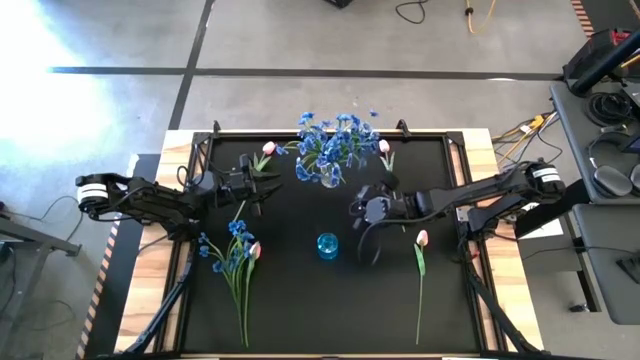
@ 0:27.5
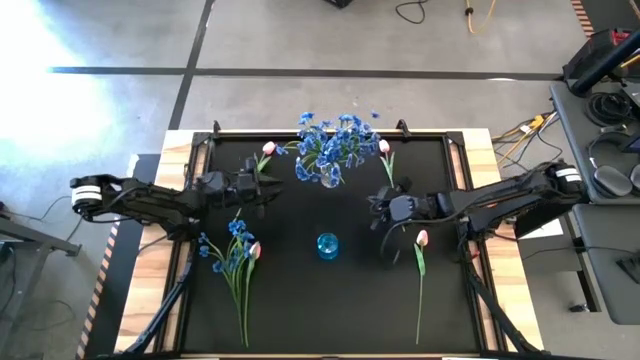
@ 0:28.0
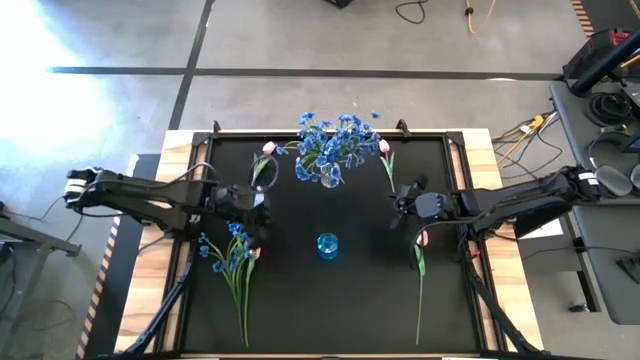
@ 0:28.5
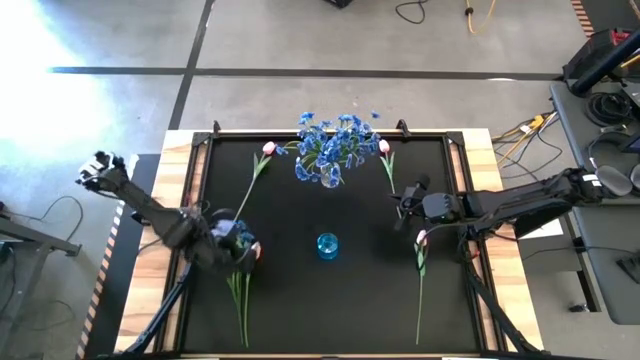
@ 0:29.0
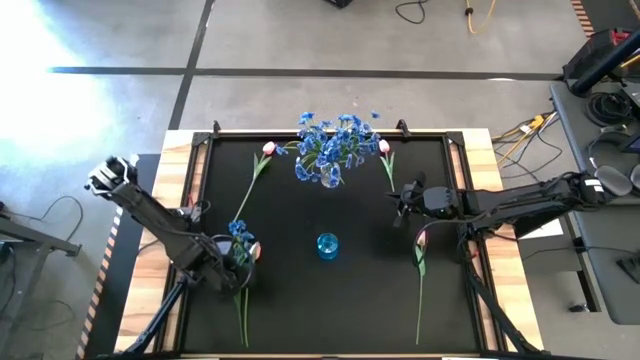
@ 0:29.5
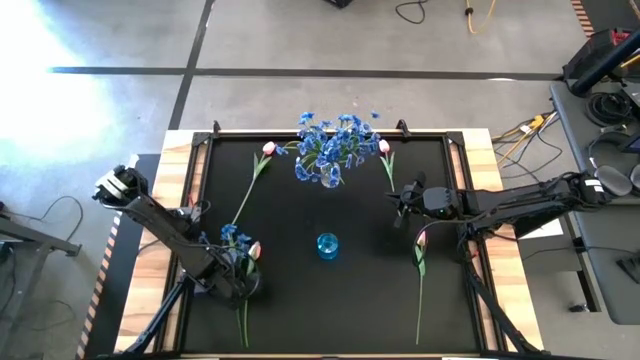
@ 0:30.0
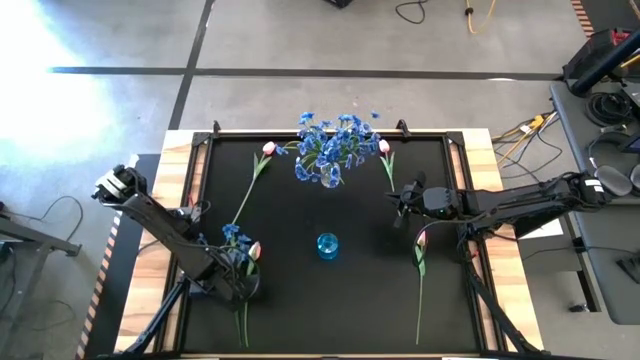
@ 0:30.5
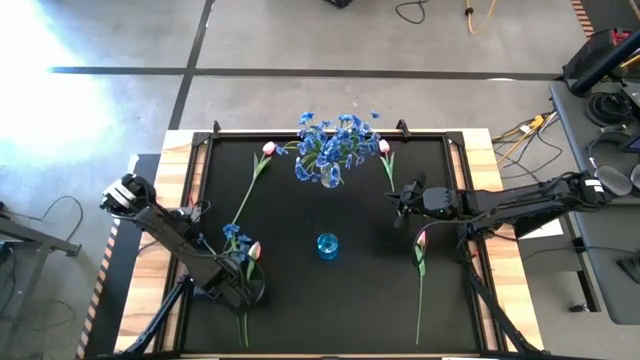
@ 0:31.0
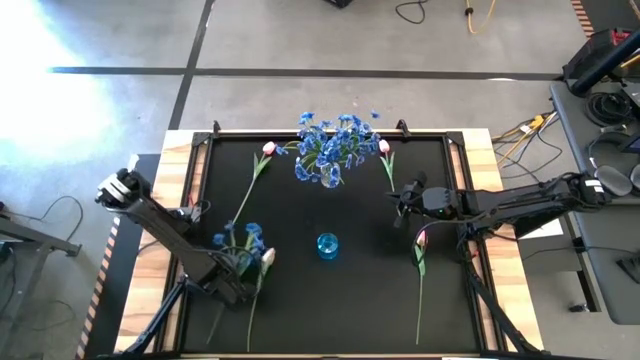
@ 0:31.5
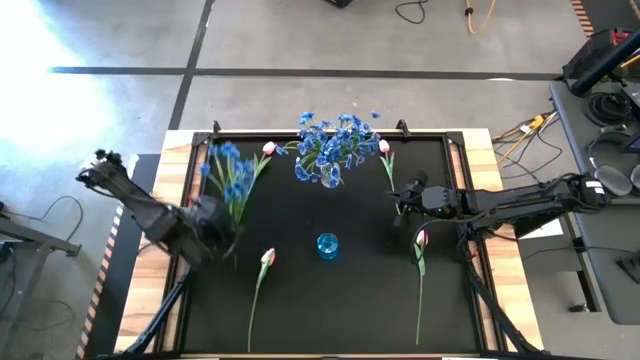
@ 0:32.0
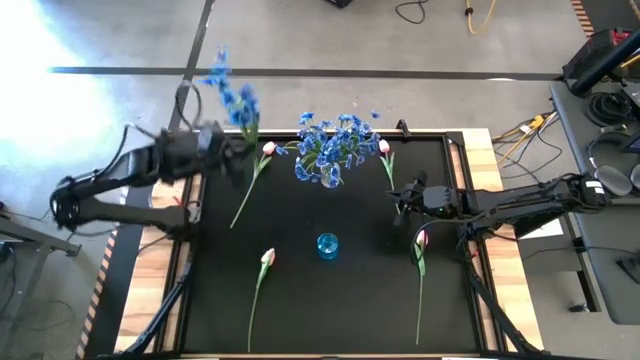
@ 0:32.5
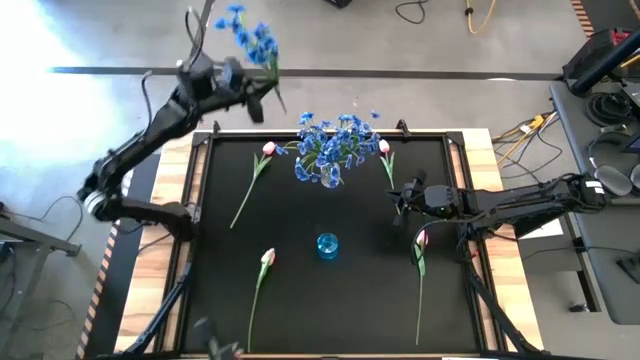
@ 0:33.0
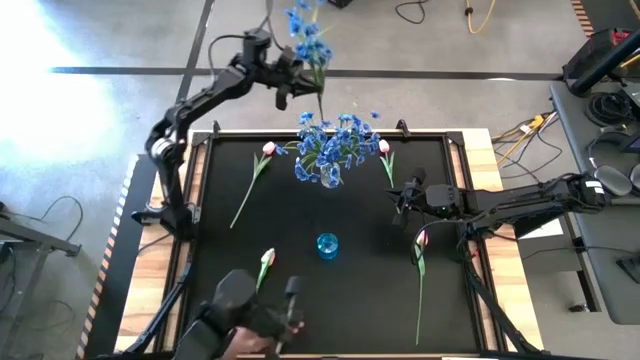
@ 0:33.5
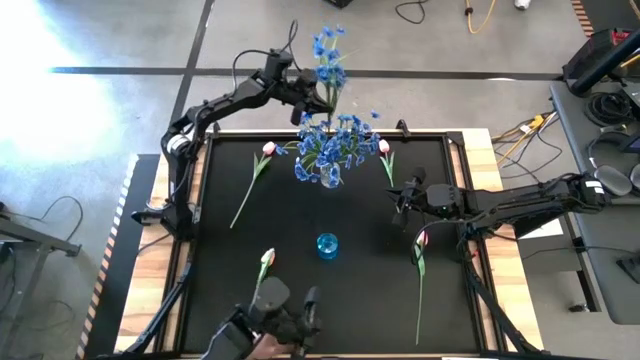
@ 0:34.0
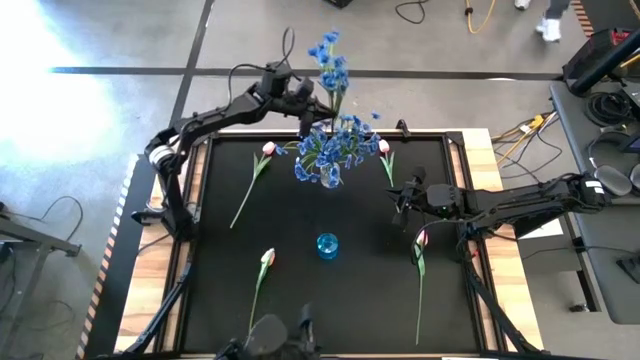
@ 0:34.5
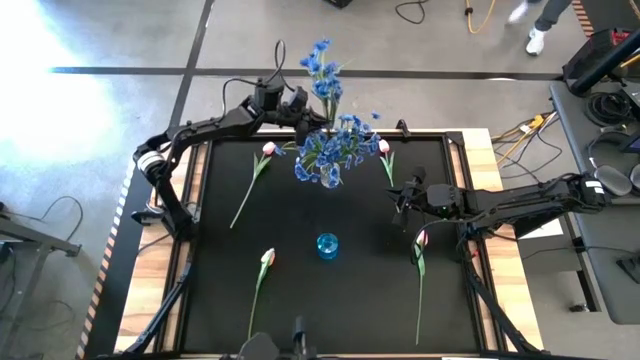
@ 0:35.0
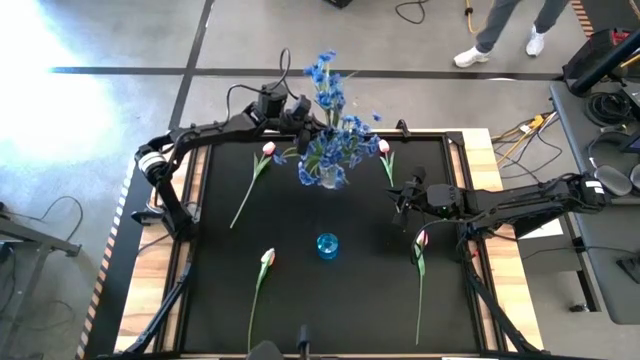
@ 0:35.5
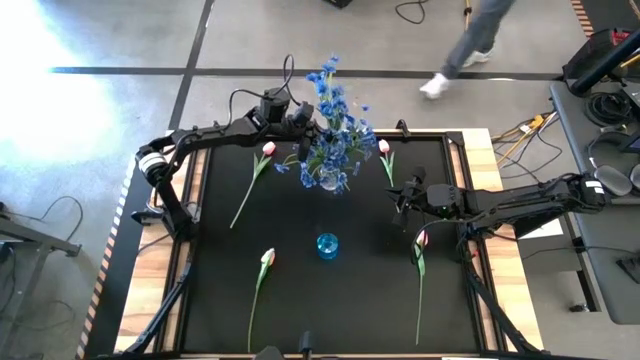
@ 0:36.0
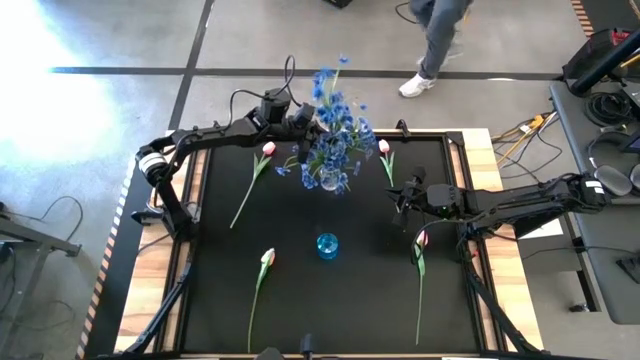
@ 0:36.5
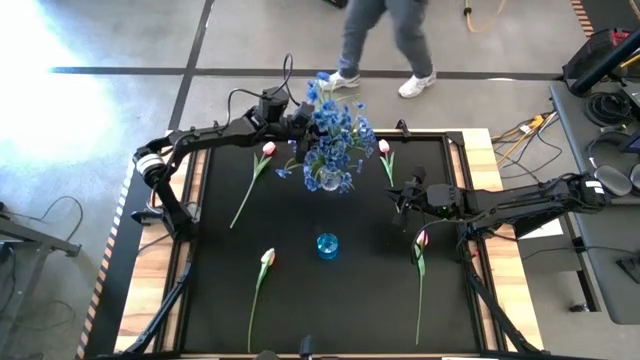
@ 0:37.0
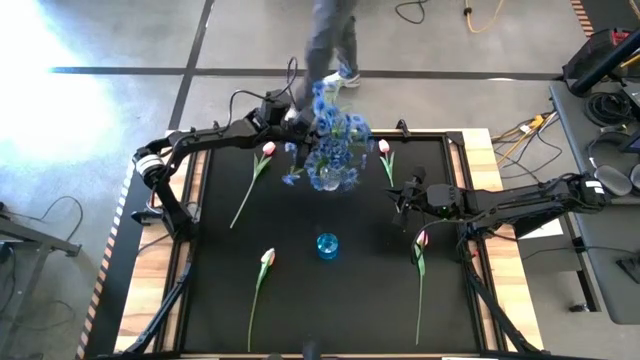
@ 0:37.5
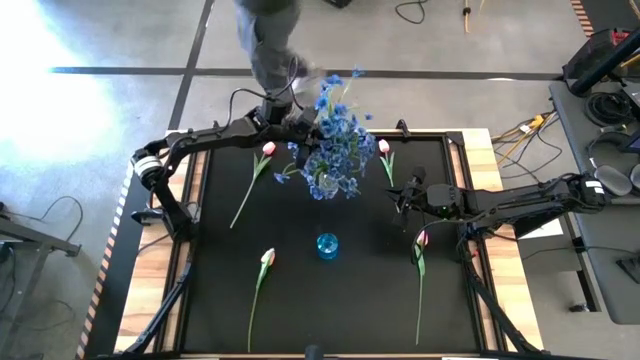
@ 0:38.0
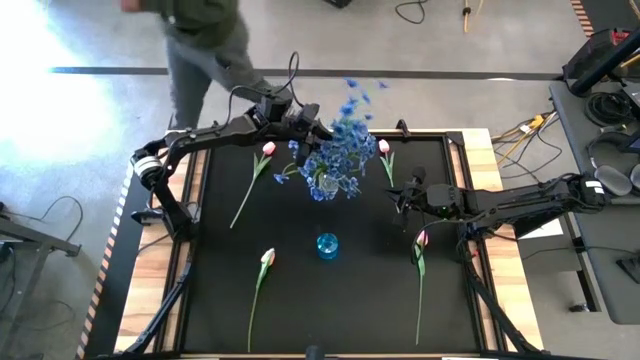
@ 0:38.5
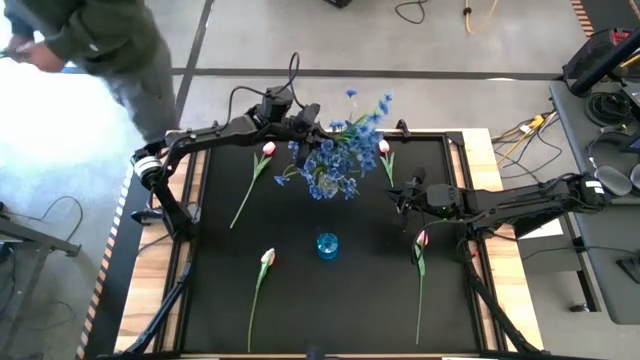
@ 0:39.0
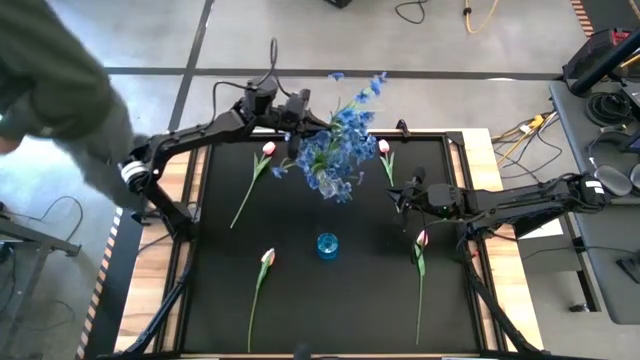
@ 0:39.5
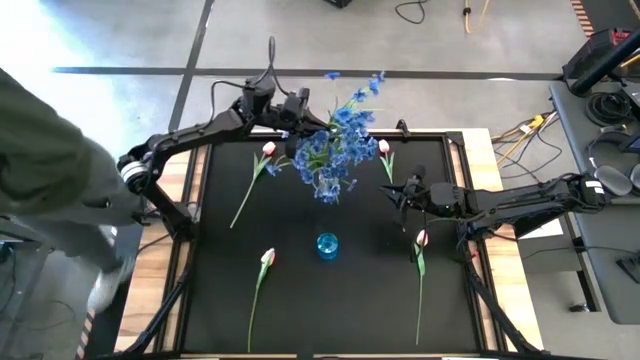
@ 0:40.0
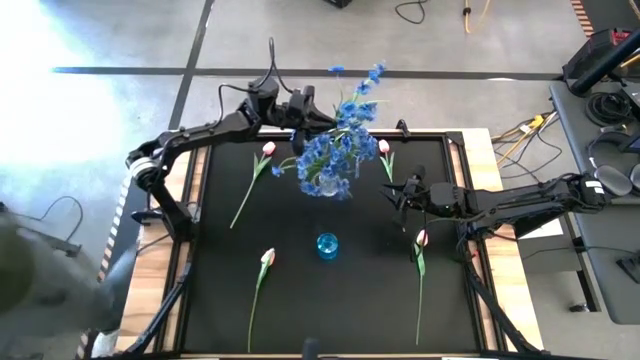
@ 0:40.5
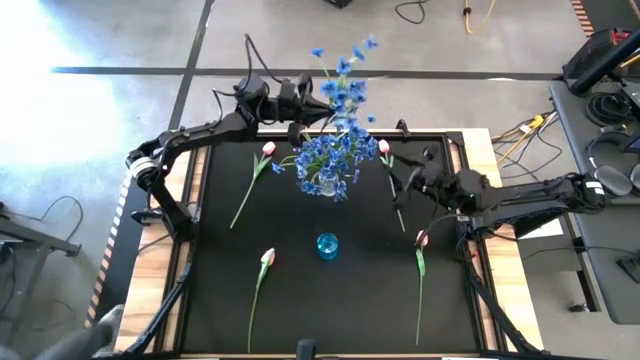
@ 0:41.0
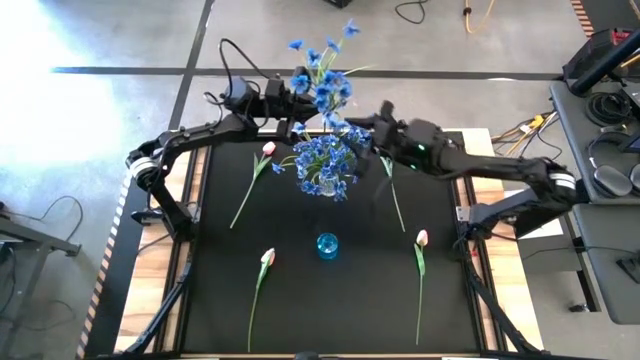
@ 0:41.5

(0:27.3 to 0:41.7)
Task: Sort flowers into vase by color
Put the blue flowers into the transparent vase

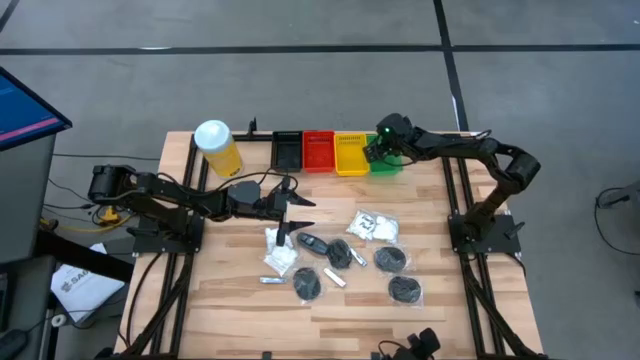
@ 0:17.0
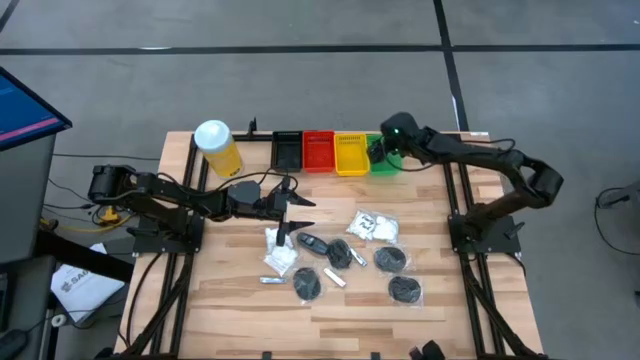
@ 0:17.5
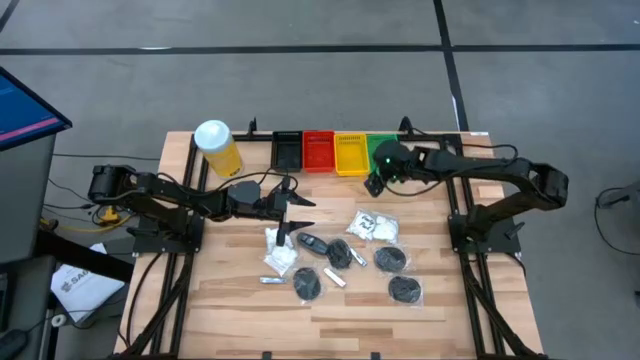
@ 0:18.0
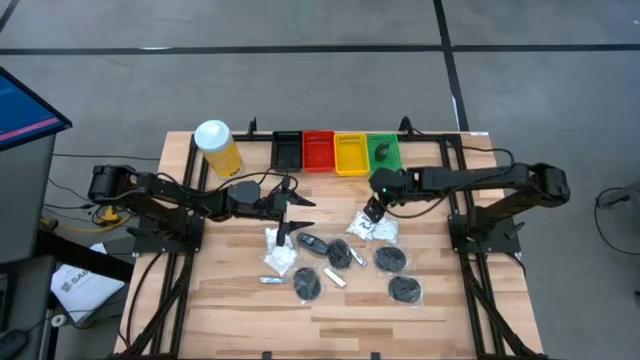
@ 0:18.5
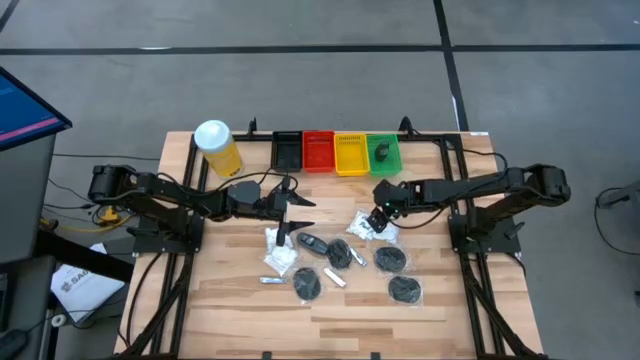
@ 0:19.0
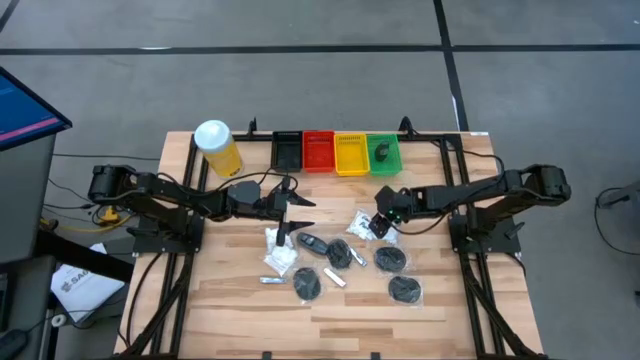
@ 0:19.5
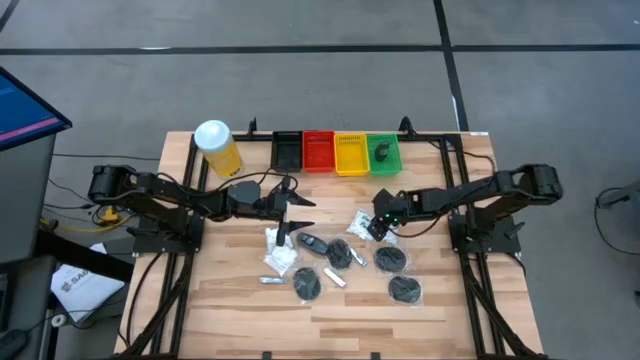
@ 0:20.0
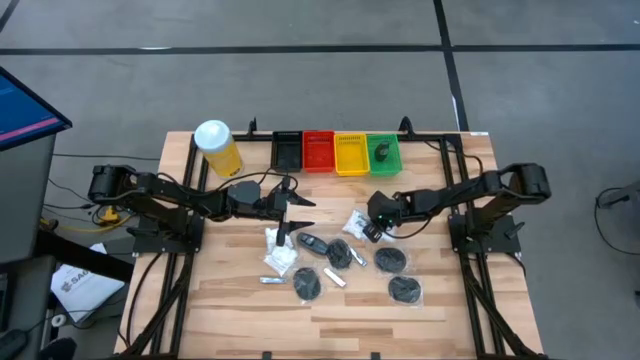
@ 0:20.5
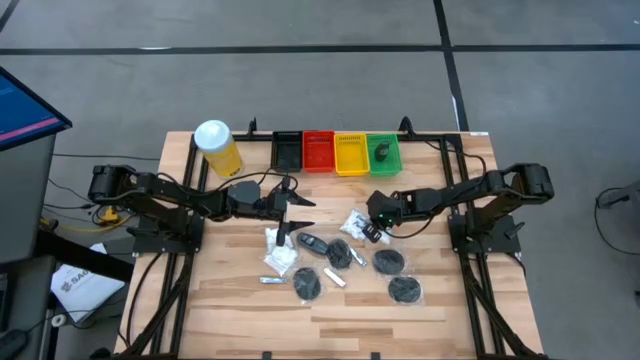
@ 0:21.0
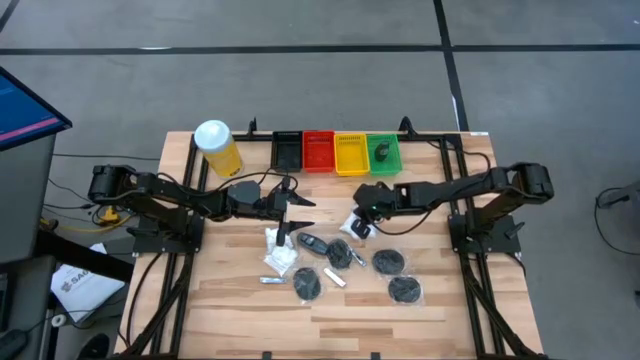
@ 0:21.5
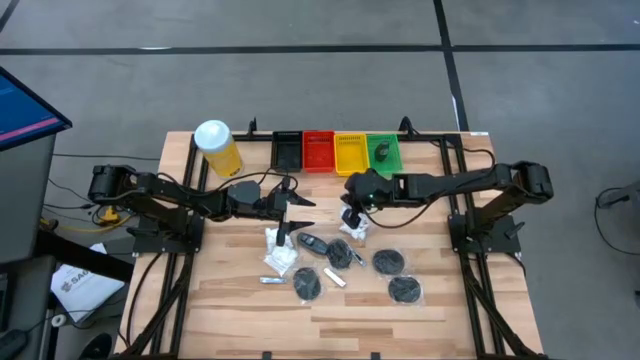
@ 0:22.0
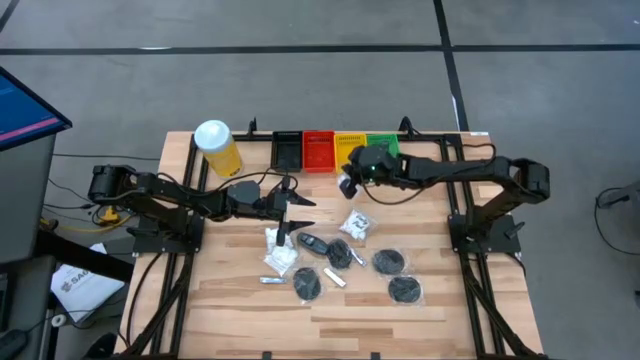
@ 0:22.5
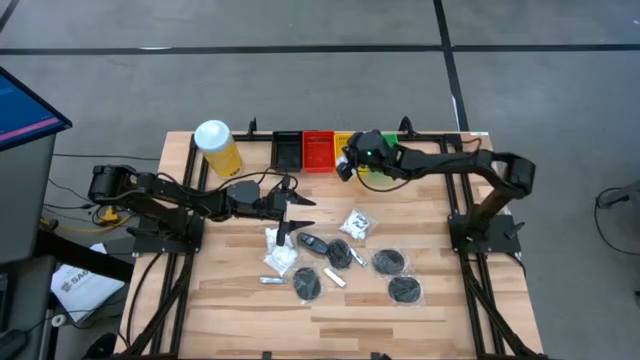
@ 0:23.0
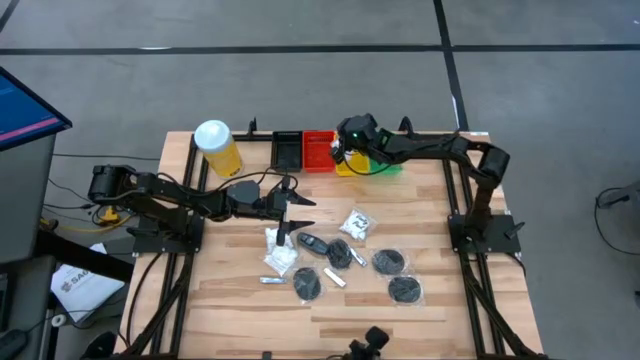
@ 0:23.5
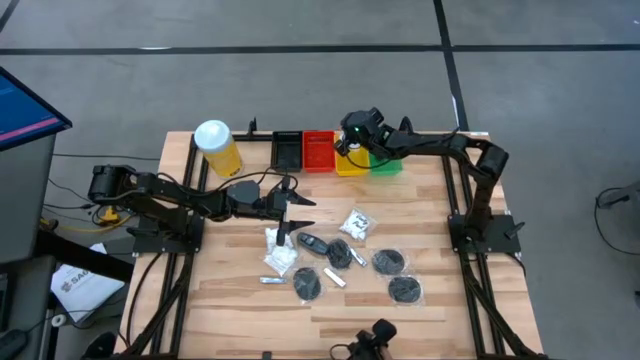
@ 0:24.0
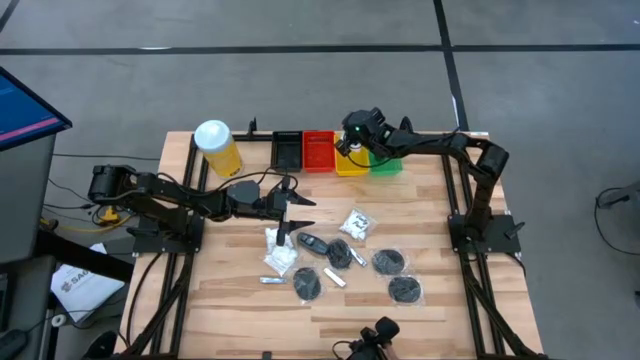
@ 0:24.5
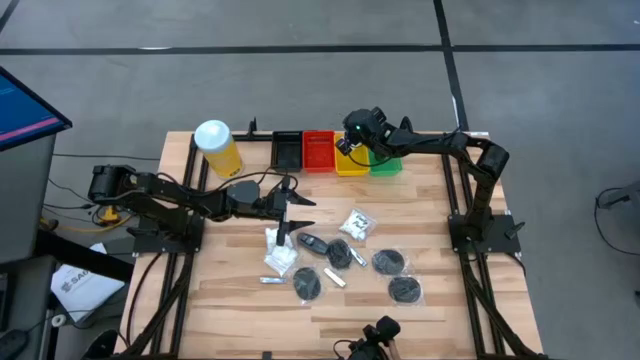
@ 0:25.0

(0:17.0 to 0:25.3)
Task: Pick & Place Travel size toiletries
Put the cotton pack into the yellow bin
